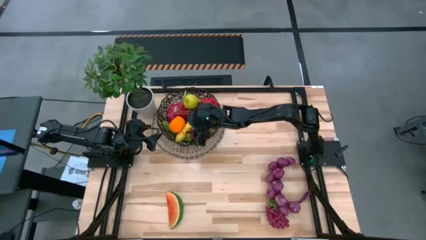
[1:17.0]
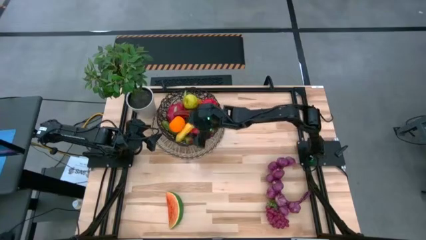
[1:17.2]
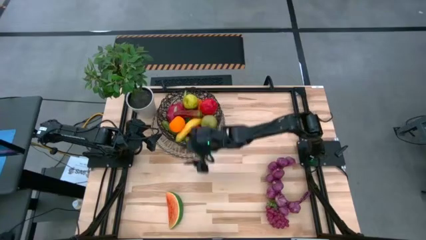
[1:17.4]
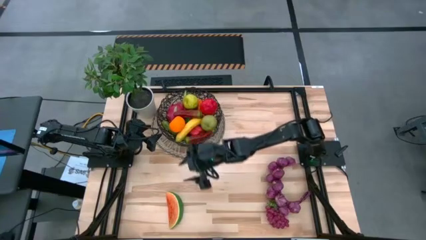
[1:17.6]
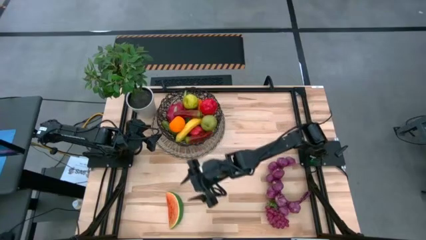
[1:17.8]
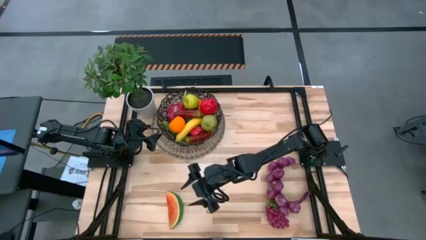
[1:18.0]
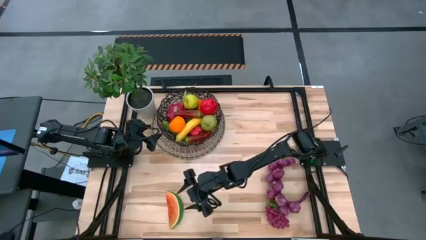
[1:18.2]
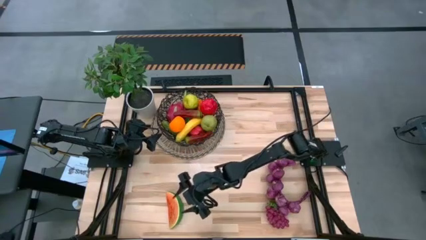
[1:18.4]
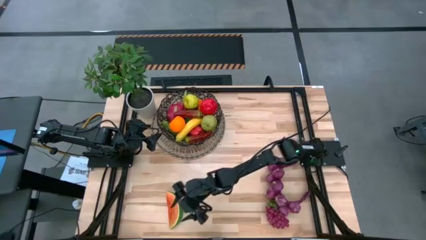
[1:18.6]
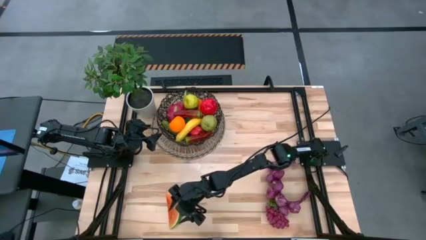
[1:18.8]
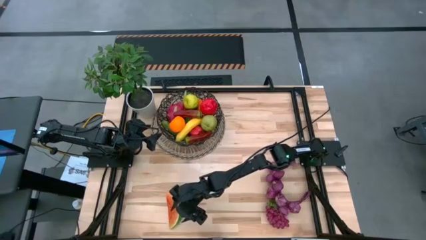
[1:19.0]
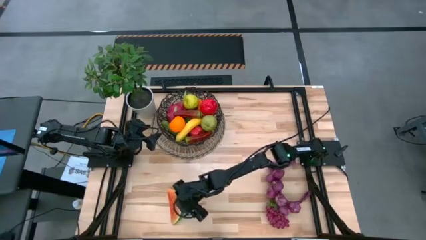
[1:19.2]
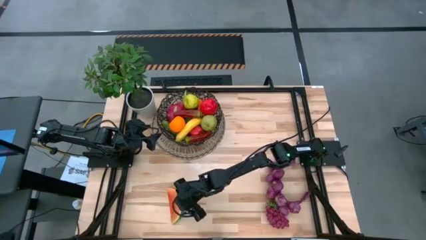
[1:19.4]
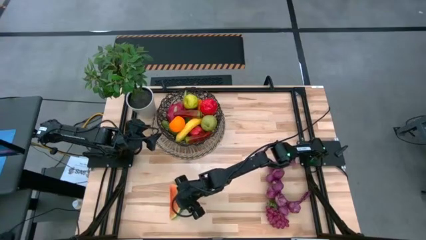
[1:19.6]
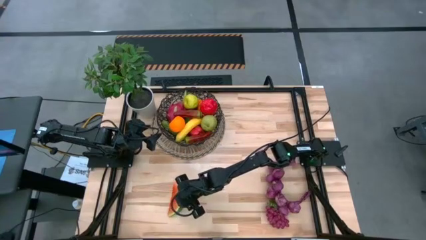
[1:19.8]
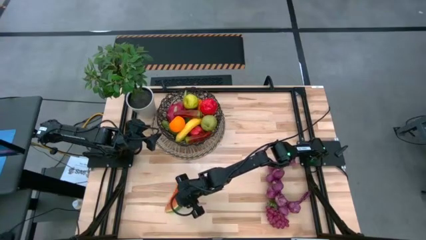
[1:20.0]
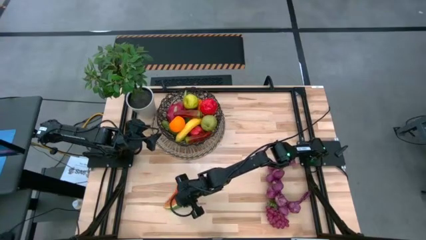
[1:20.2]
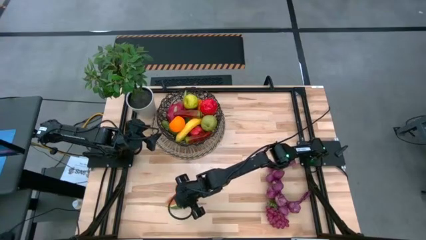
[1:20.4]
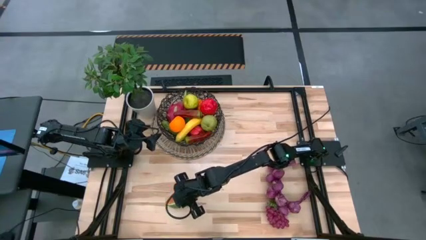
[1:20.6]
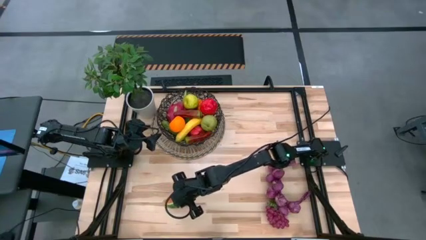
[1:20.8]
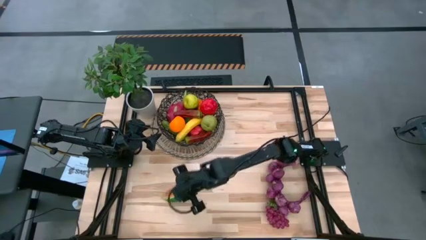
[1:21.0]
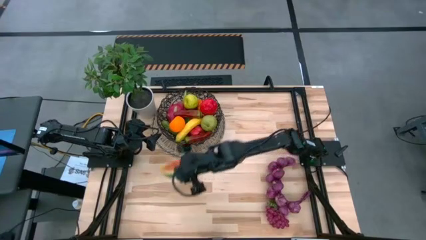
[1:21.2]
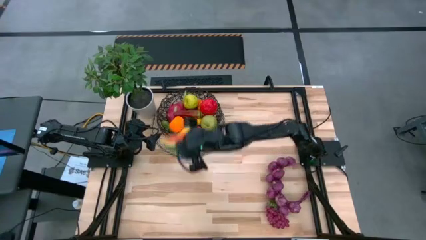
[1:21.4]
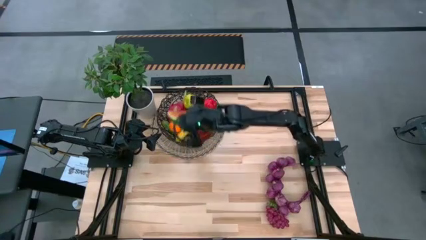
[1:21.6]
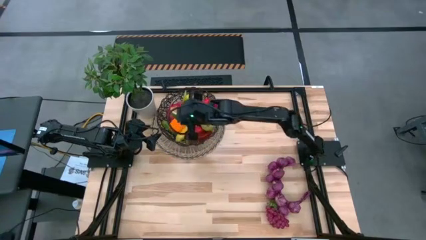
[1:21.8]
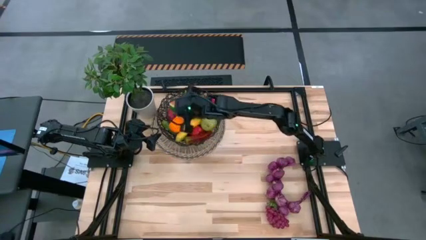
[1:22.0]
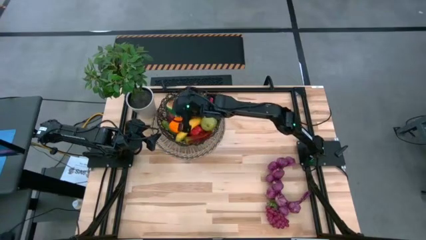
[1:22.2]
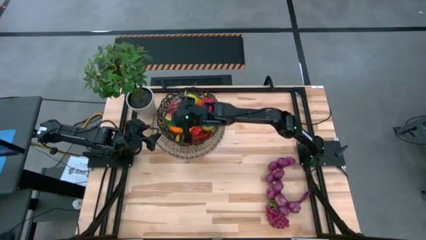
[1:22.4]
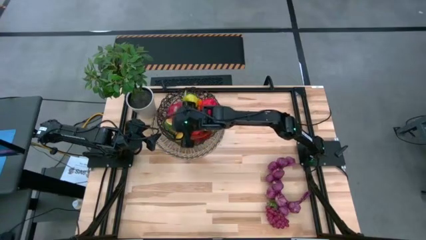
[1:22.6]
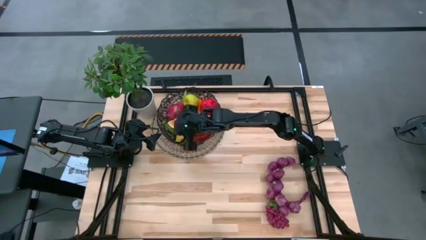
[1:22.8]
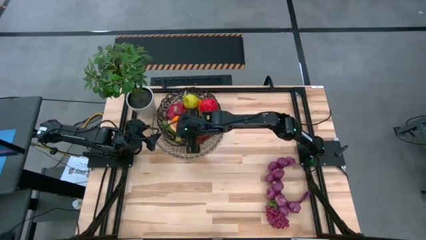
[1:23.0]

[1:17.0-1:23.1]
Task: Build produce basket
Put the sliced watermelon into the wire basket

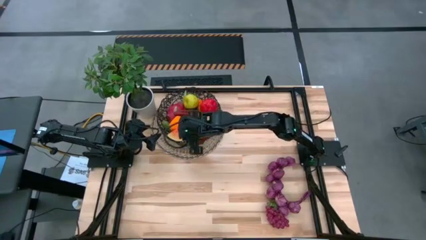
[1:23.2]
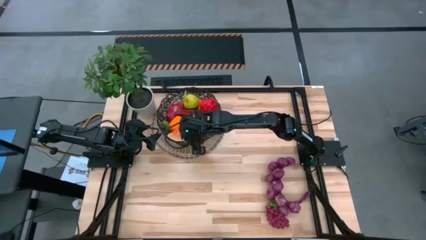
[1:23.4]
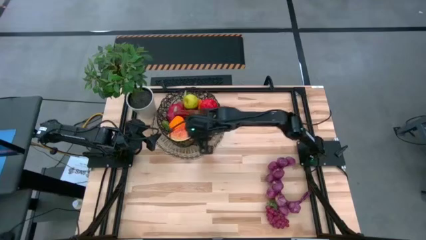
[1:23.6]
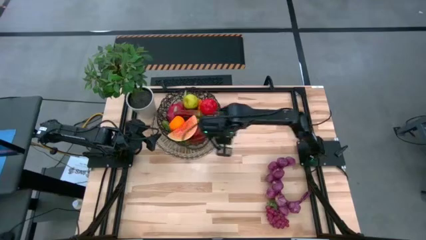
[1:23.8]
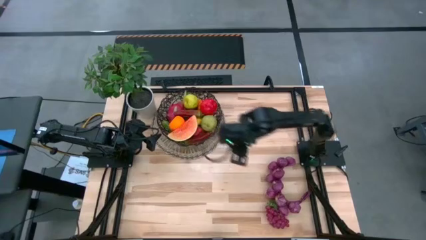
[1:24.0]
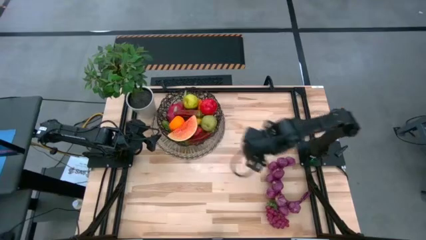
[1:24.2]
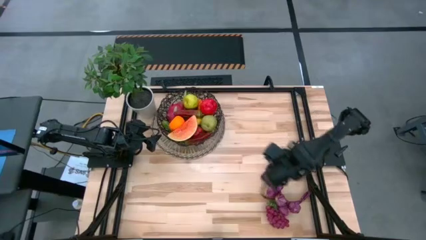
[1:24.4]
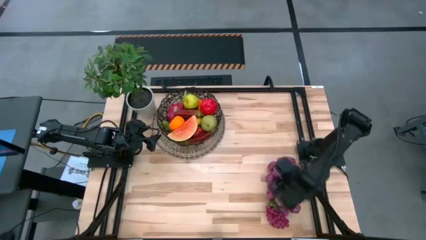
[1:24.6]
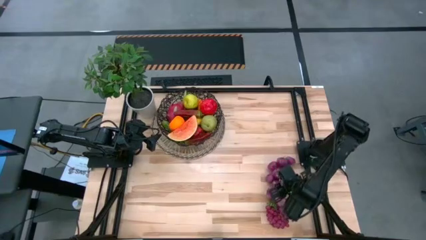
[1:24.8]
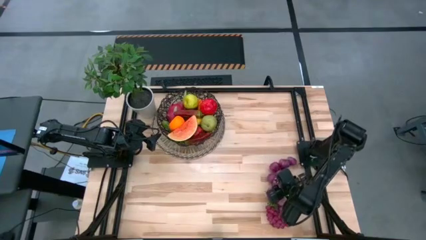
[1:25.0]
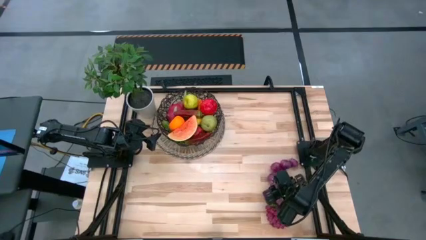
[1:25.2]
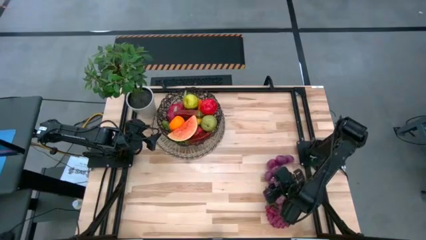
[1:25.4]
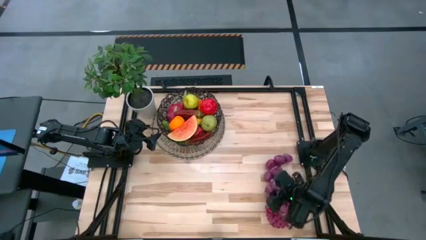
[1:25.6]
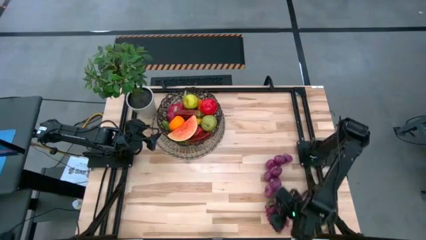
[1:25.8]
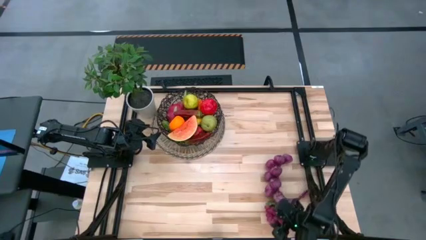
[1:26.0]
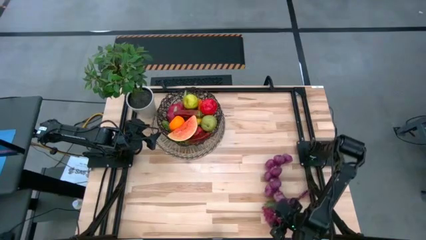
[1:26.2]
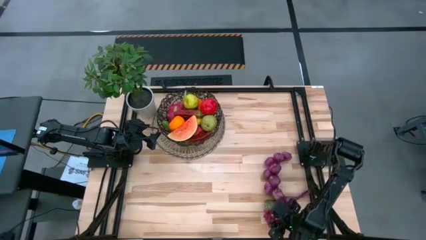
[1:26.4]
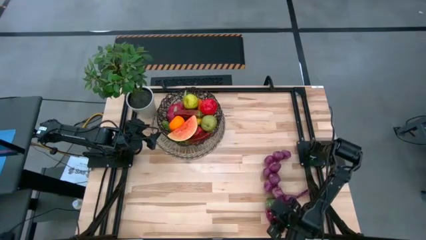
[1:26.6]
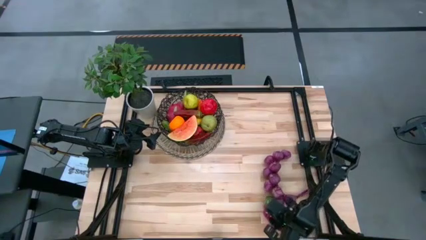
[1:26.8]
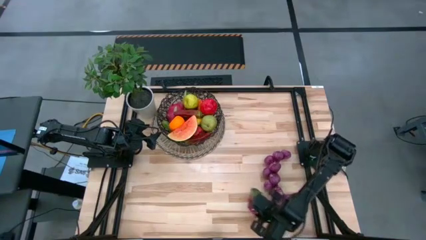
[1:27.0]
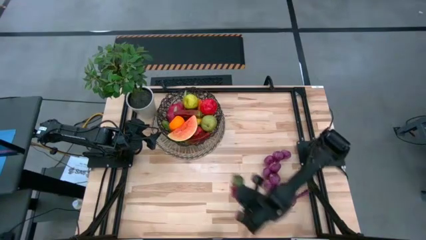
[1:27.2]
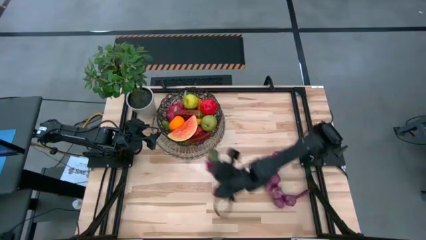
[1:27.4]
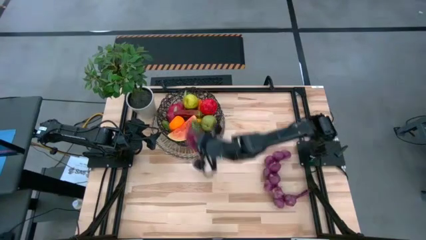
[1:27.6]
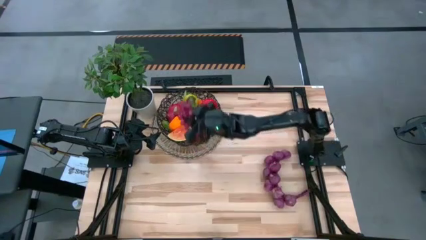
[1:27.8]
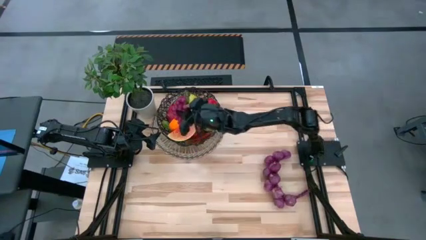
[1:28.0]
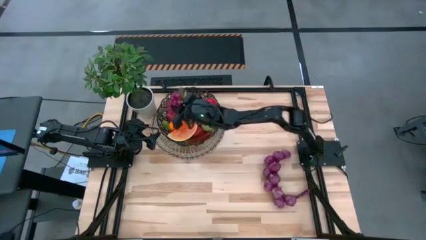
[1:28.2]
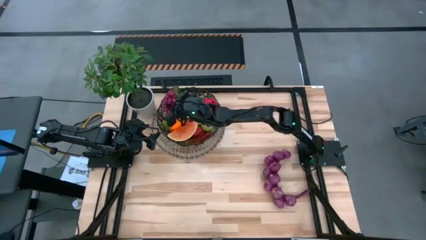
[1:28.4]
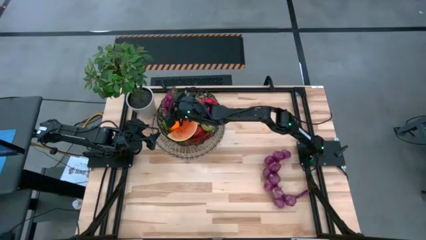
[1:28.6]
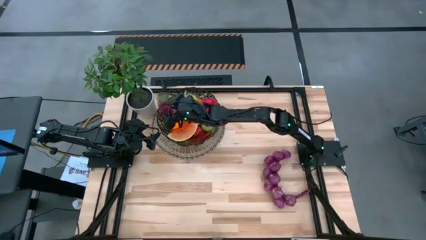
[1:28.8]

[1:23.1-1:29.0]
Put the grapes into the wire basket

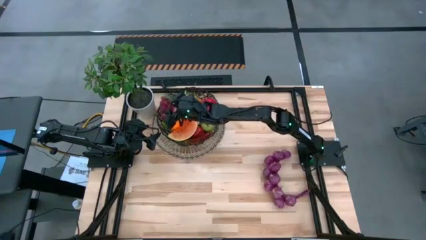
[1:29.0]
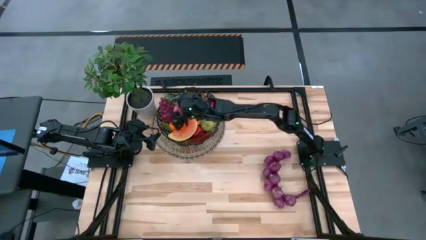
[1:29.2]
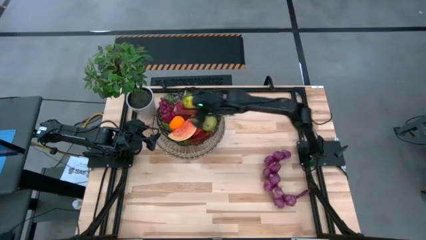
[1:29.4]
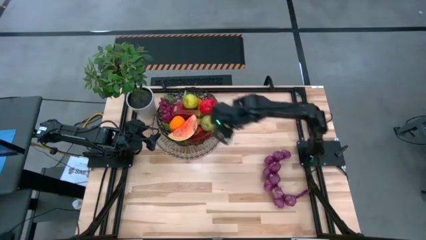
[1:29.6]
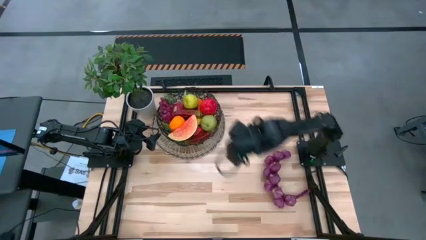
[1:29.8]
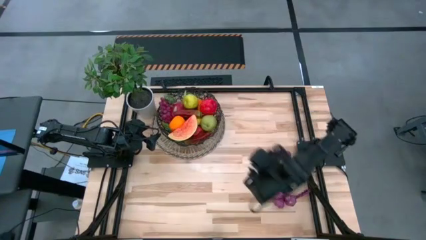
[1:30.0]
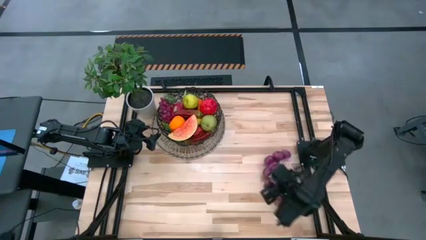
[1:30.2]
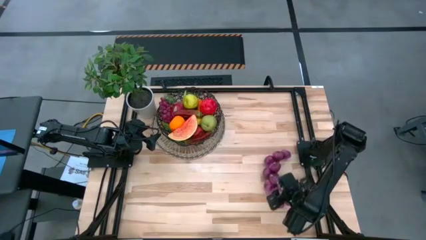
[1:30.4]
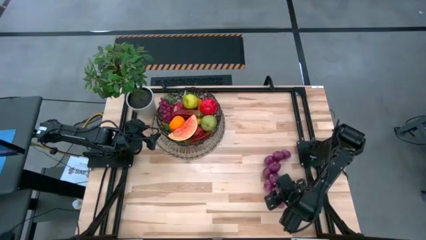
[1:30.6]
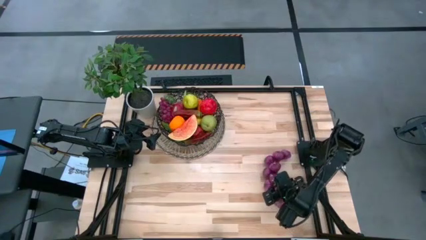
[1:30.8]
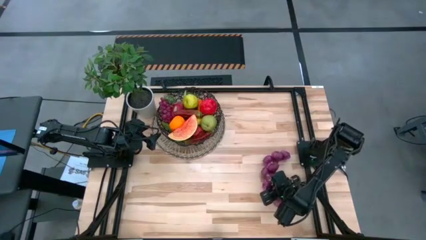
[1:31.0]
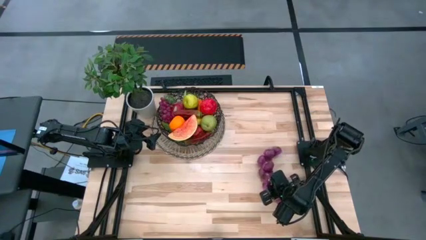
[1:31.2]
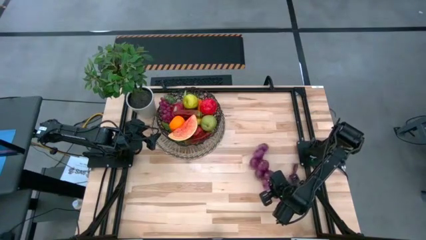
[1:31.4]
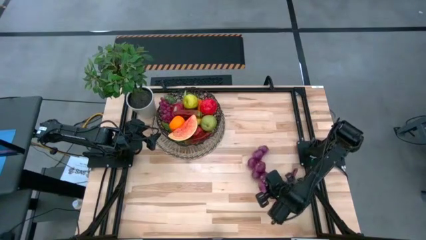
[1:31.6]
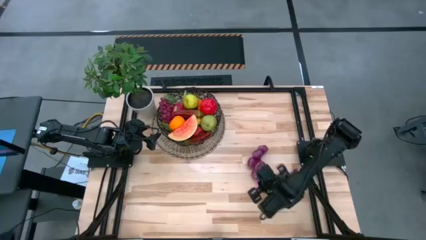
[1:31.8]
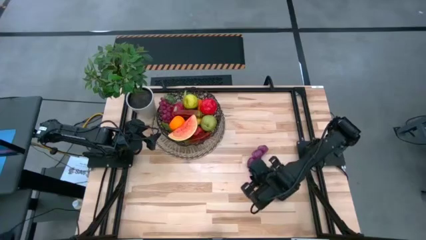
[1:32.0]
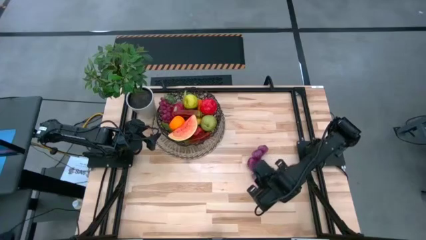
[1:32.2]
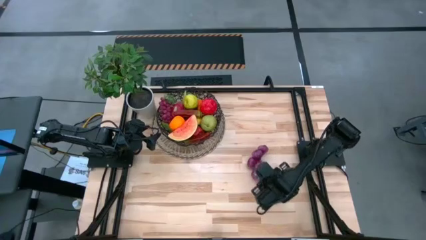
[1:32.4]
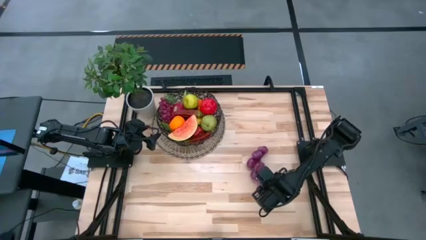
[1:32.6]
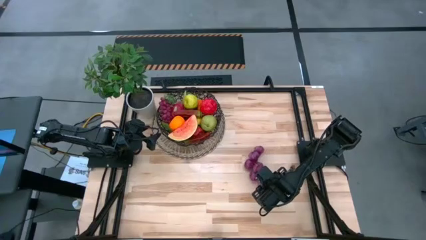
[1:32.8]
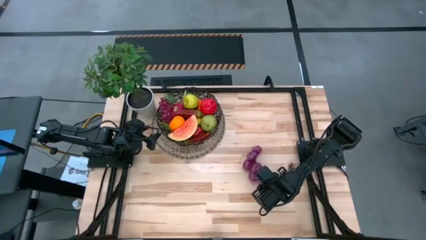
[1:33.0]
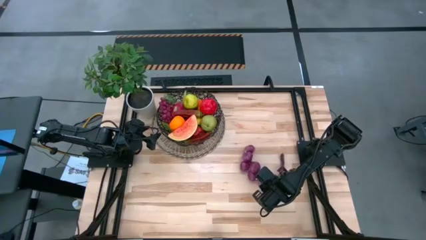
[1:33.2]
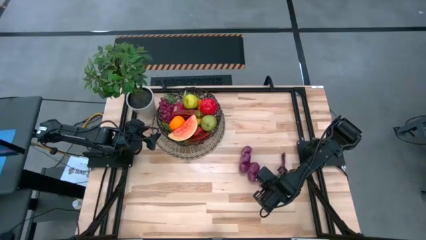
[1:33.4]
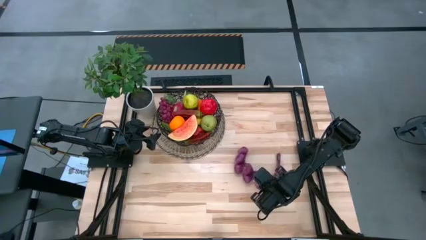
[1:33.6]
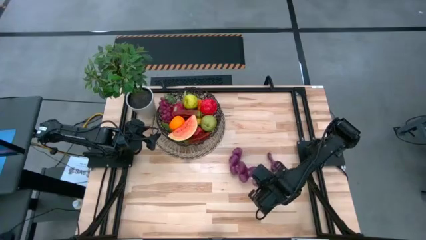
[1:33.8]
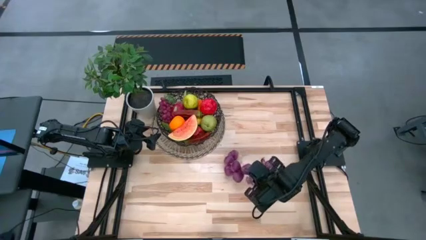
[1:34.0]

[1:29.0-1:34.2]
Put the purple garlic into the wire basket
